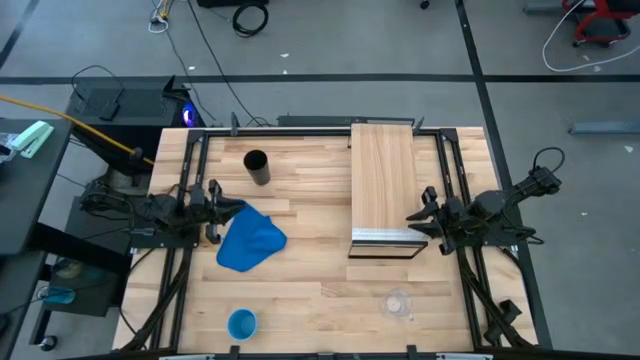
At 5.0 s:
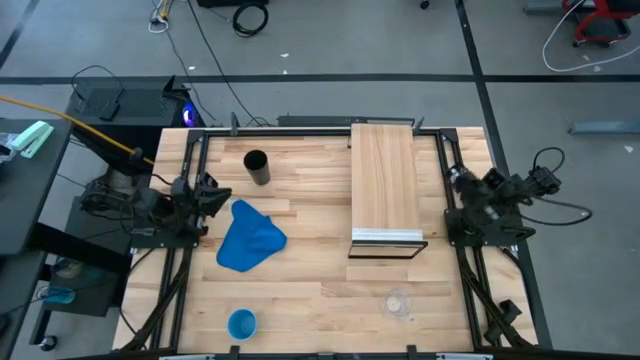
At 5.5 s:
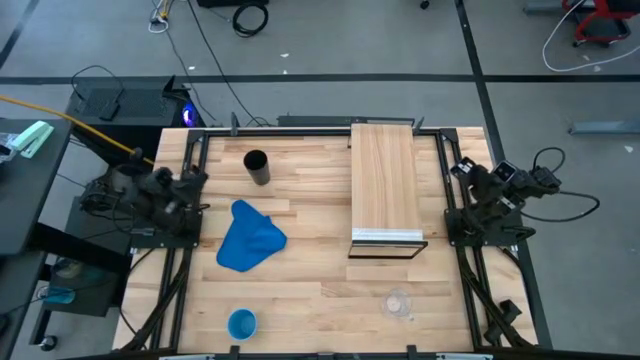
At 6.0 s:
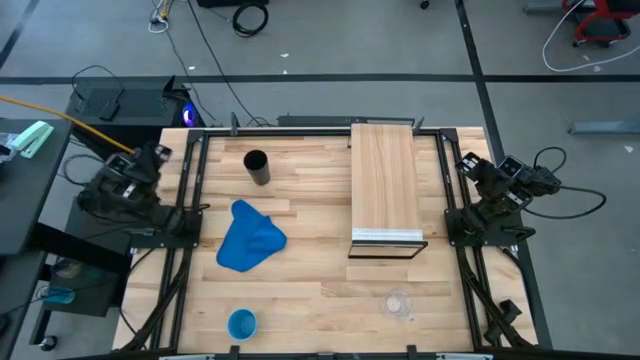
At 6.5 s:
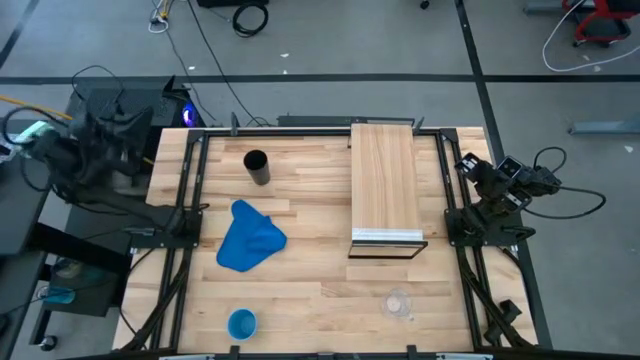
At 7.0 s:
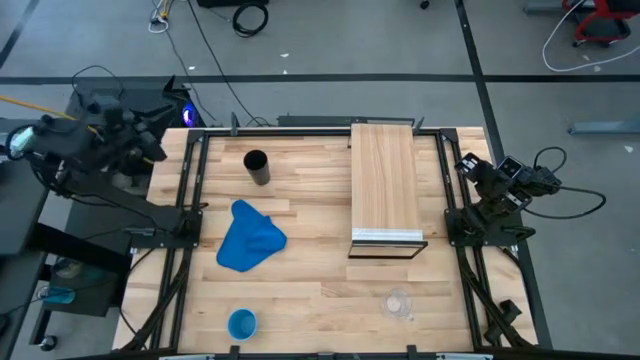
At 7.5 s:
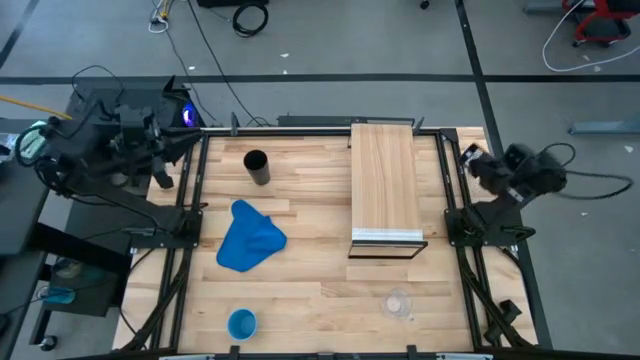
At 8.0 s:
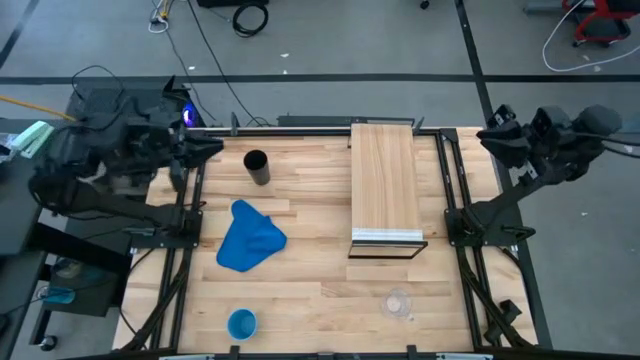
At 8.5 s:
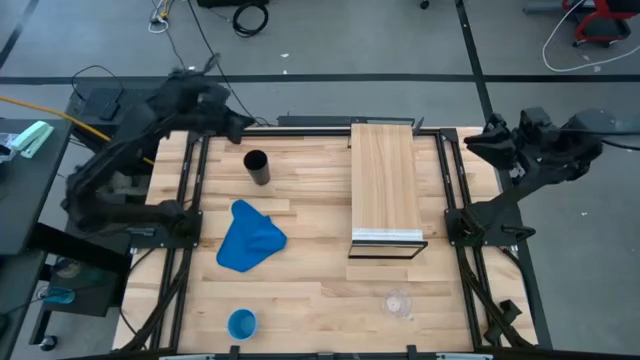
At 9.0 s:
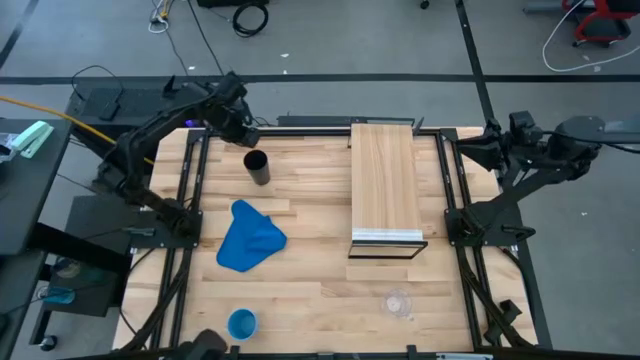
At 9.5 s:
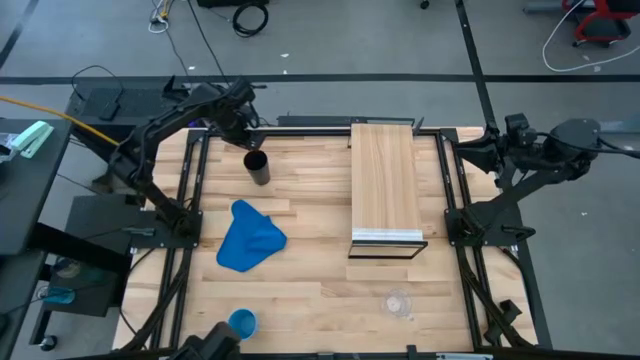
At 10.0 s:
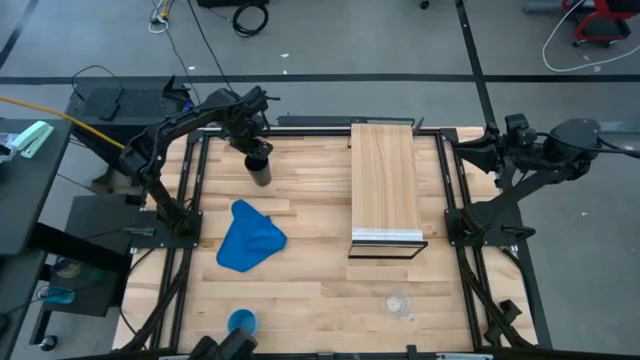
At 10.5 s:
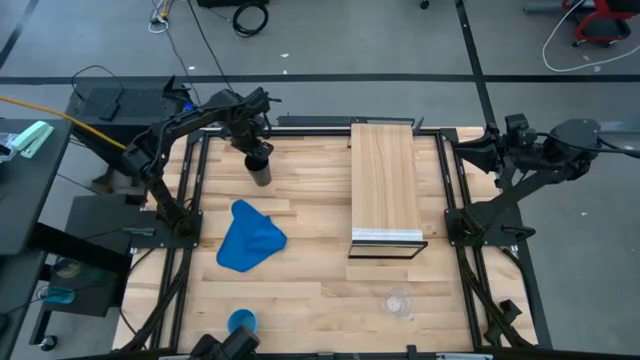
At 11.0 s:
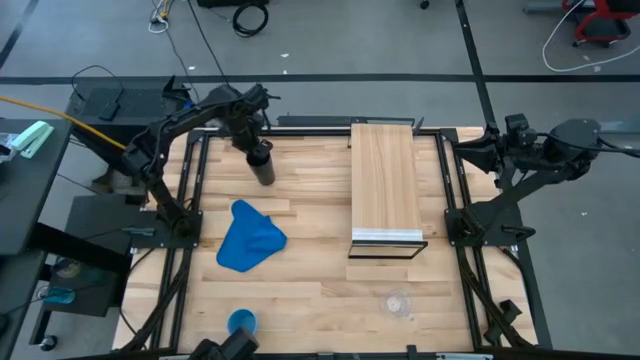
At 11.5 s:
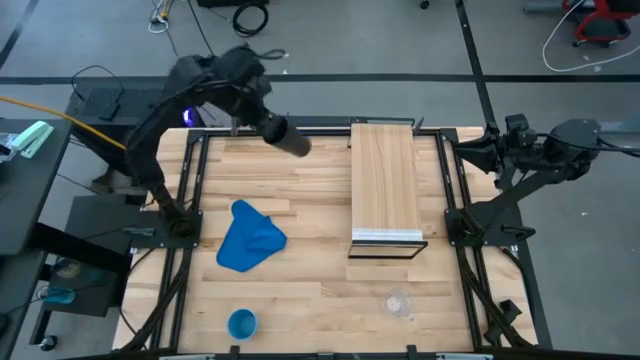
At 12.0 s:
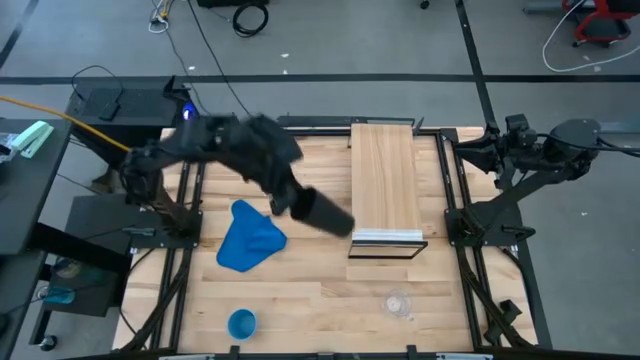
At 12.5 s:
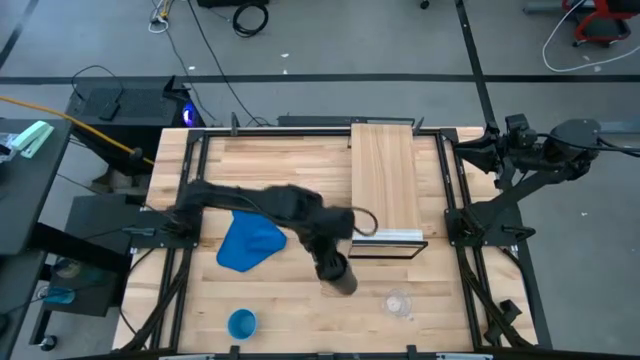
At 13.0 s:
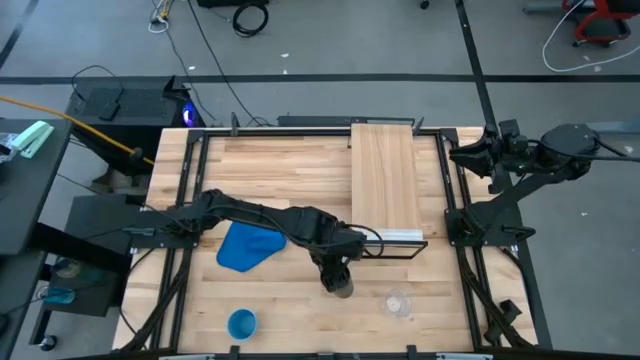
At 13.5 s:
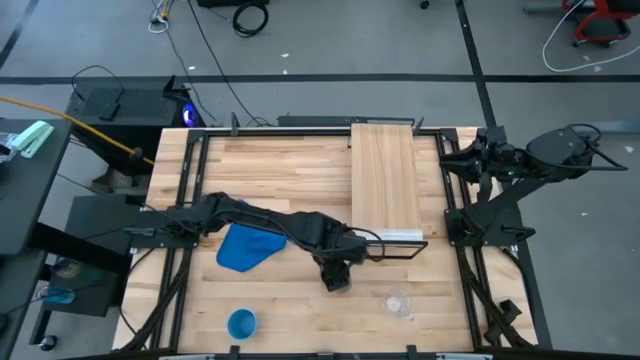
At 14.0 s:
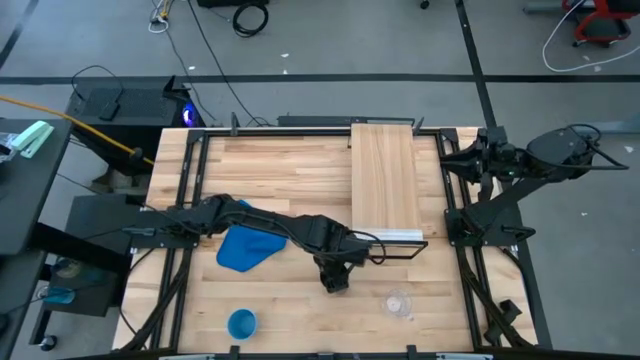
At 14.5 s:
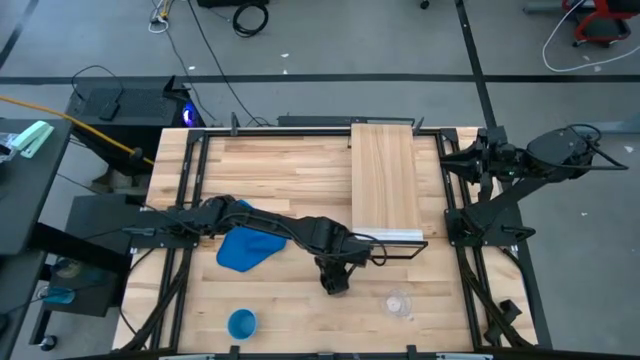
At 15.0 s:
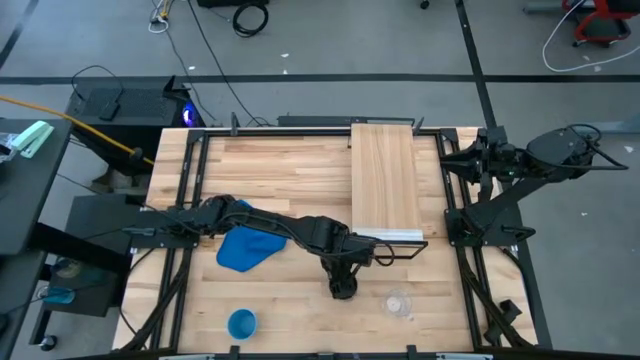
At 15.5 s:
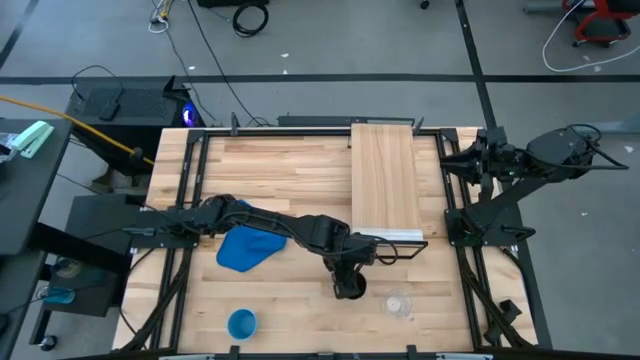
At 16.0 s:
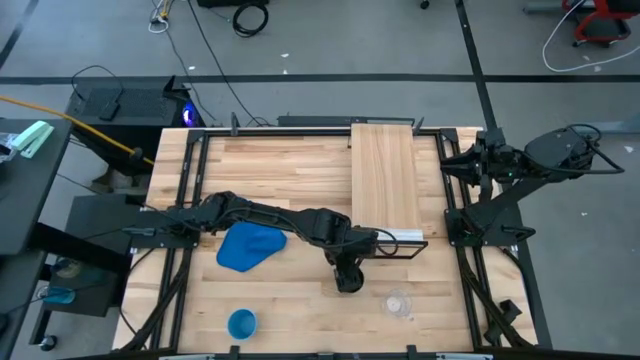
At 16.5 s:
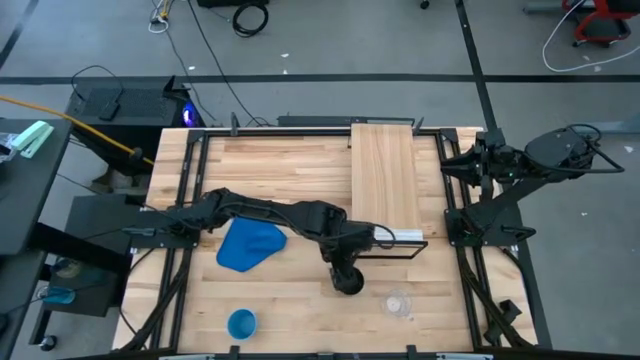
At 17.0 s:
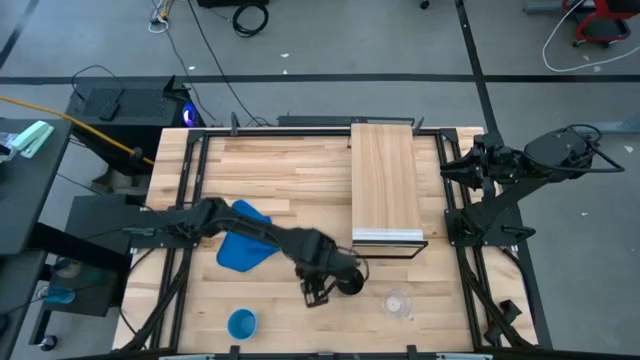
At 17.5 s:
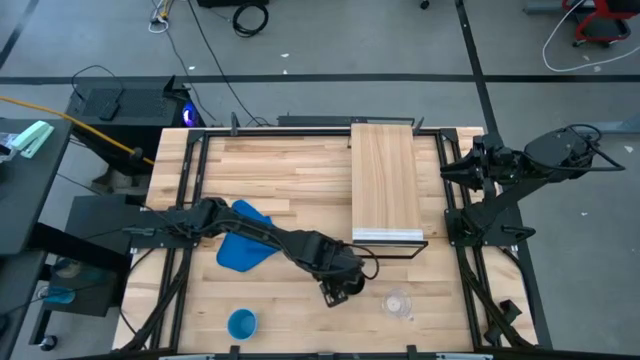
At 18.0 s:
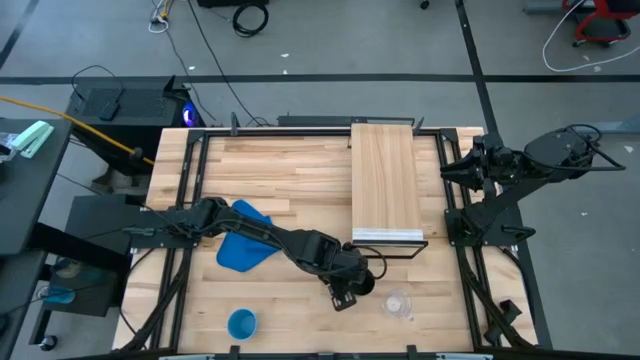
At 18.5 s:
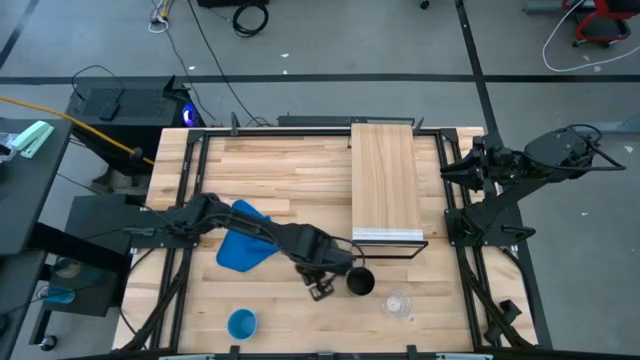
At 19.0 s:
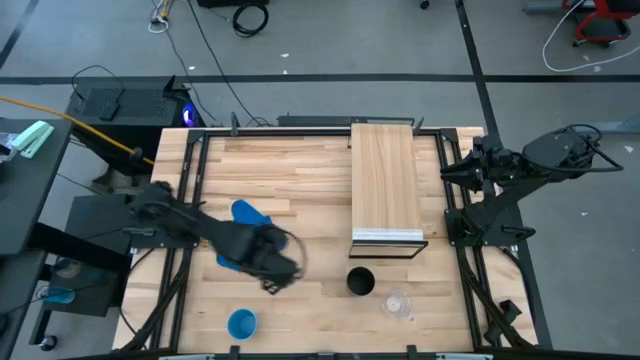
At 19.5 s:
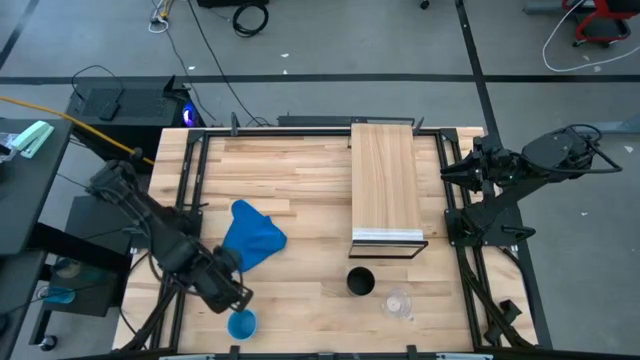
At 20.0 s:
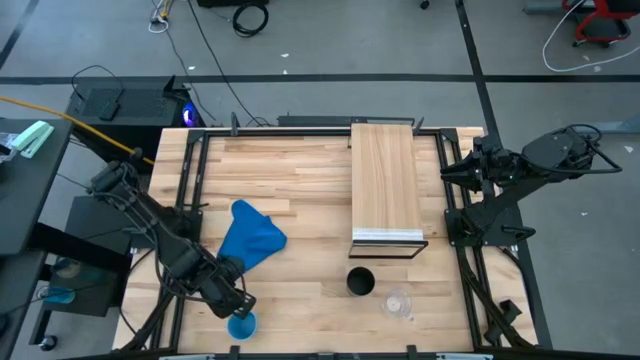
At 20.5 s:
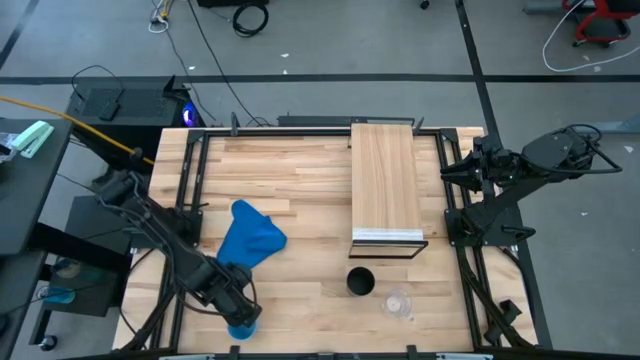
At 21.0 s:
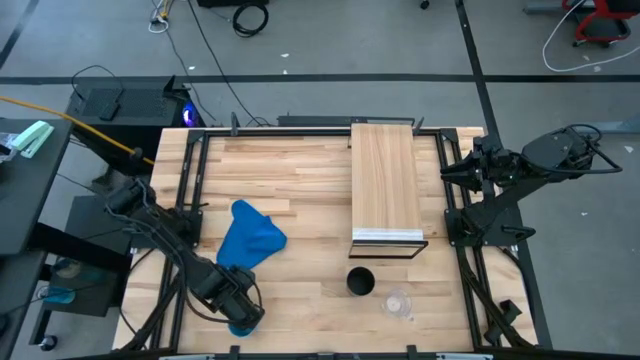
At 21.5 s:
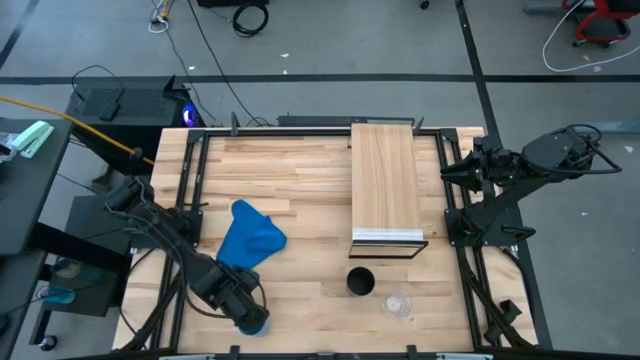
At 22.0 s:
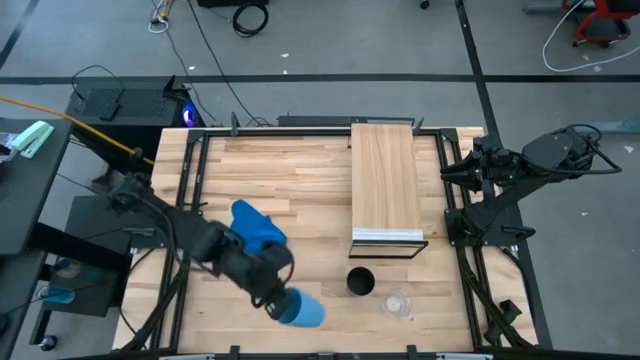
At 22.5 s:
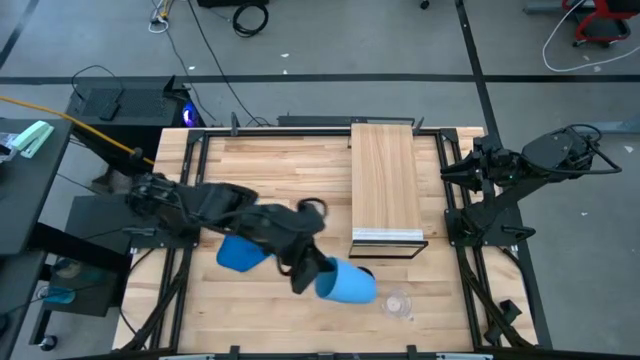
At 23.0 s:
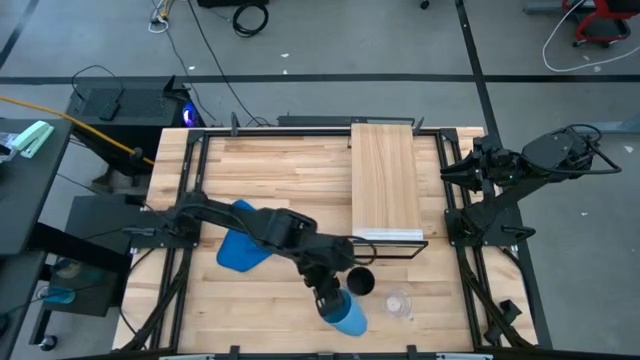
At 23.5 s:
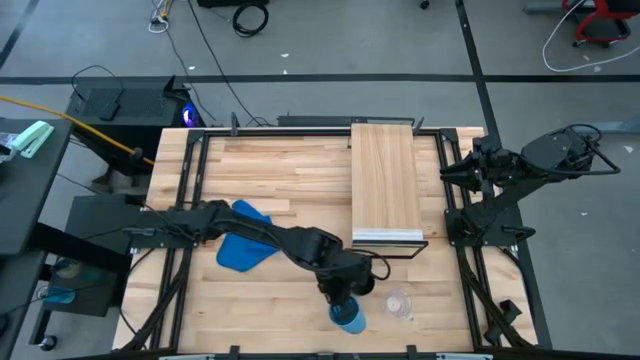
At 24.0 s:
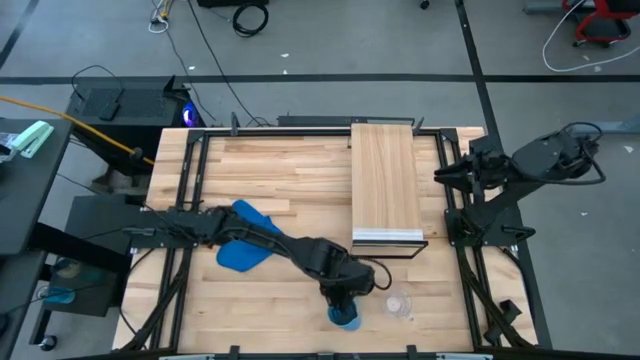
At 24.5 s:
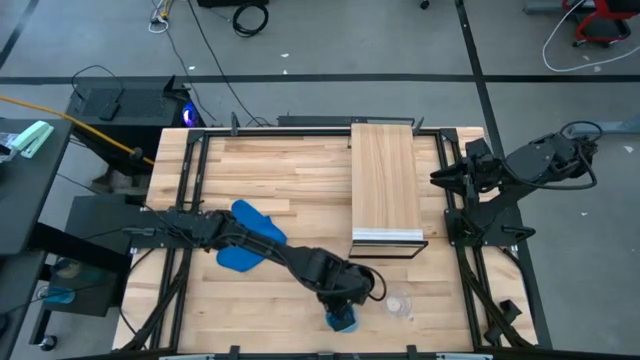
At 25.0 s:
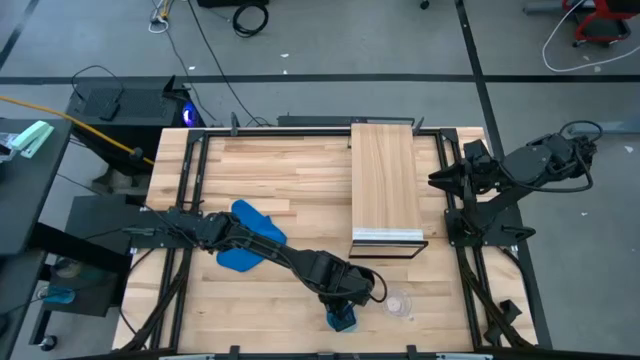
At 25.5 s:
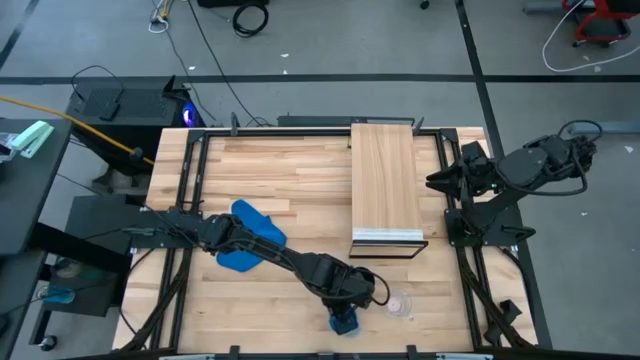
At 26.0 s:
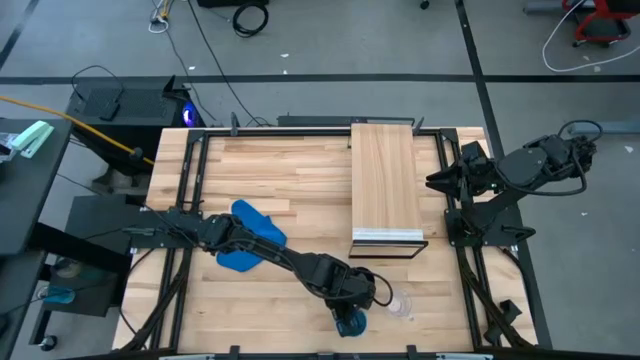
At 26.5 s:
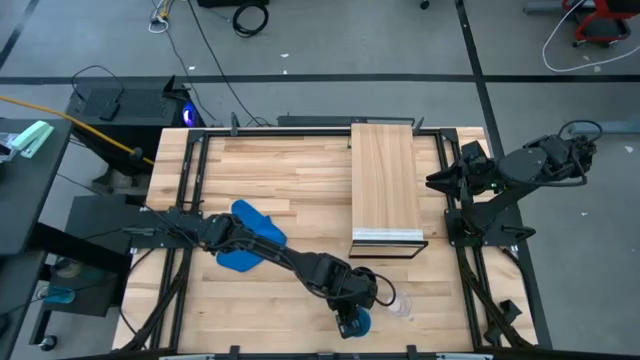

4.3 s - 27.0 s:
Task: Stack small to large cups/mugs on shelf
Move the cups to the bottom of the shelf
